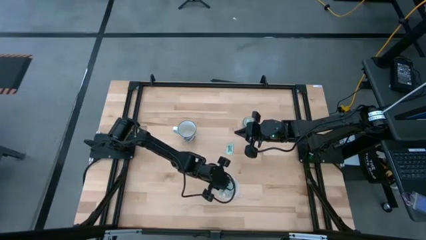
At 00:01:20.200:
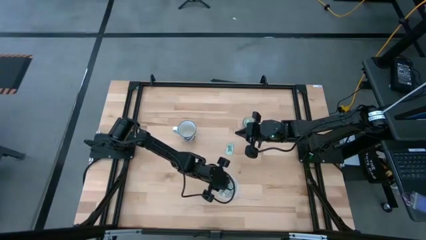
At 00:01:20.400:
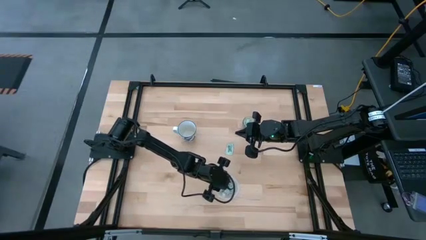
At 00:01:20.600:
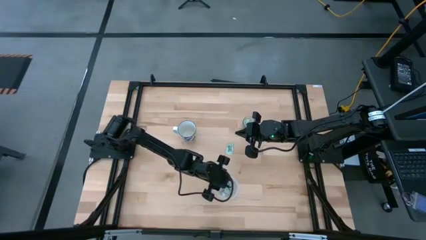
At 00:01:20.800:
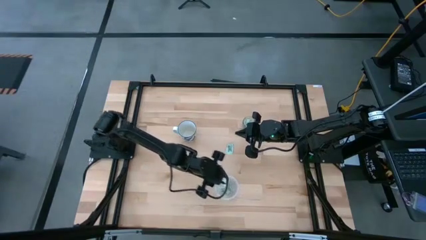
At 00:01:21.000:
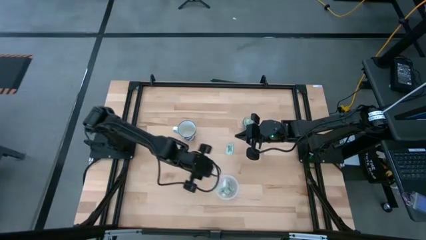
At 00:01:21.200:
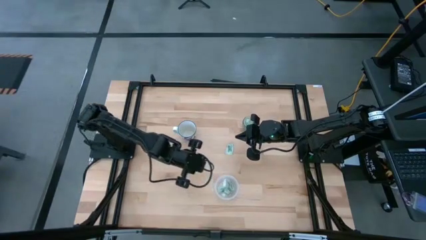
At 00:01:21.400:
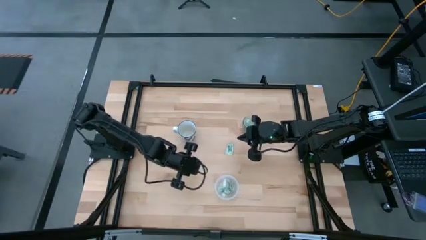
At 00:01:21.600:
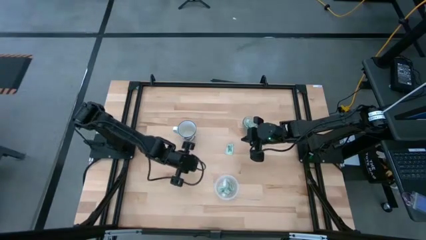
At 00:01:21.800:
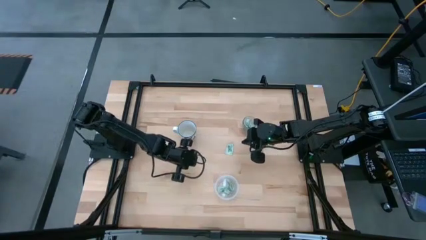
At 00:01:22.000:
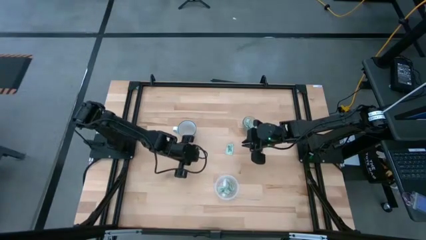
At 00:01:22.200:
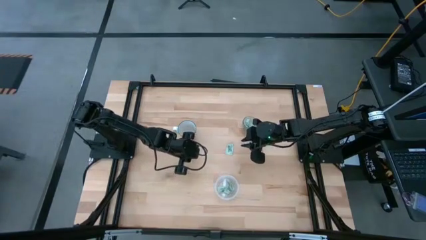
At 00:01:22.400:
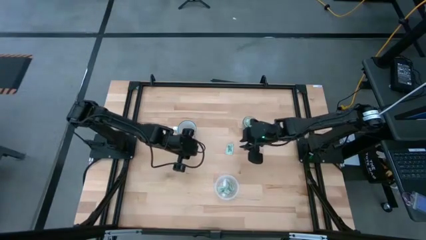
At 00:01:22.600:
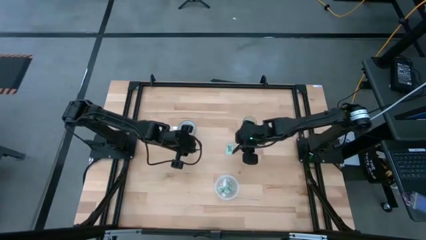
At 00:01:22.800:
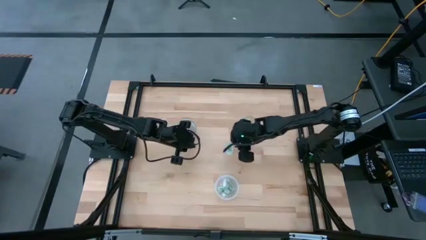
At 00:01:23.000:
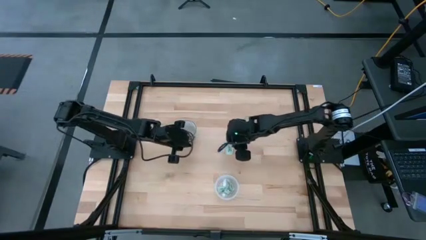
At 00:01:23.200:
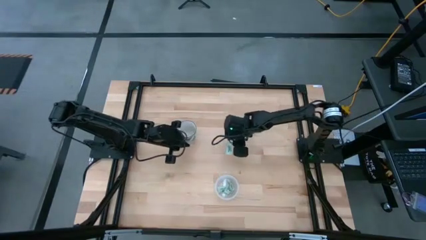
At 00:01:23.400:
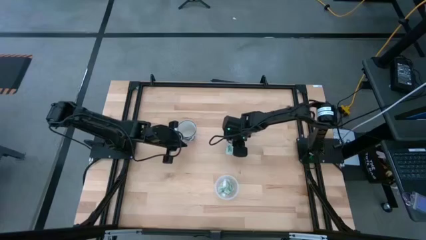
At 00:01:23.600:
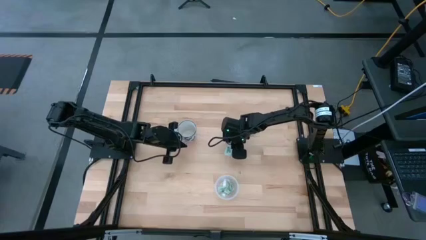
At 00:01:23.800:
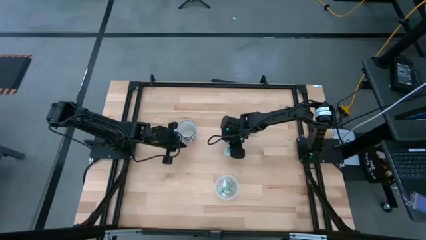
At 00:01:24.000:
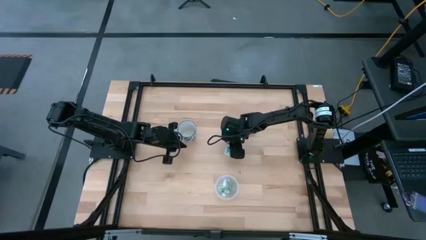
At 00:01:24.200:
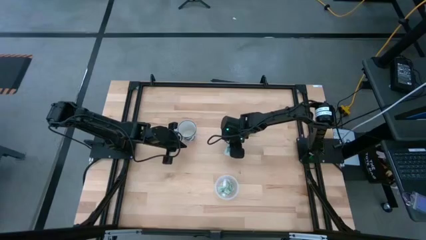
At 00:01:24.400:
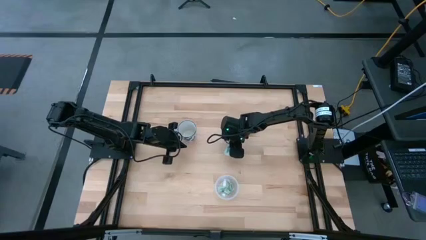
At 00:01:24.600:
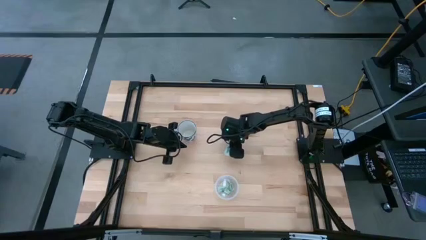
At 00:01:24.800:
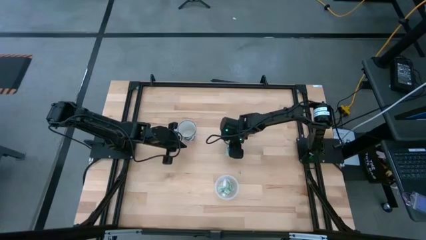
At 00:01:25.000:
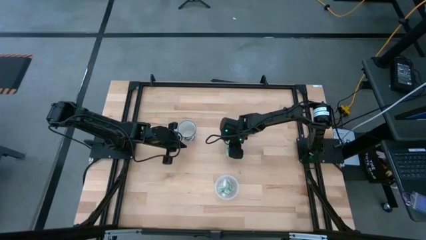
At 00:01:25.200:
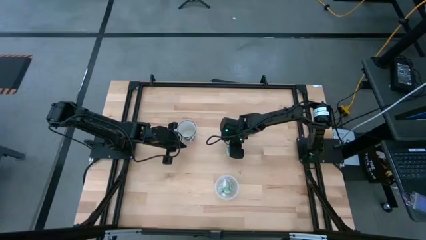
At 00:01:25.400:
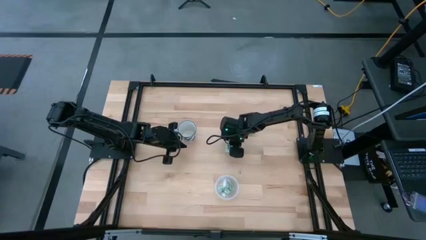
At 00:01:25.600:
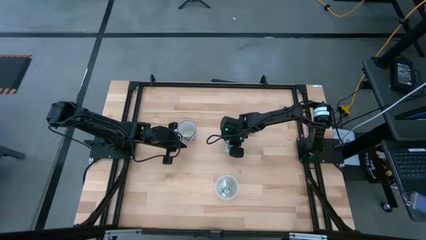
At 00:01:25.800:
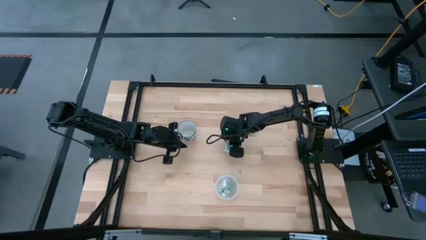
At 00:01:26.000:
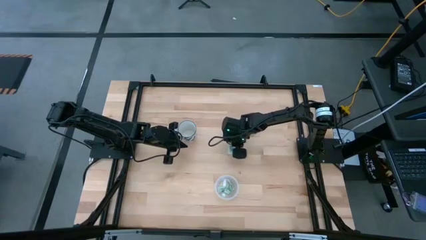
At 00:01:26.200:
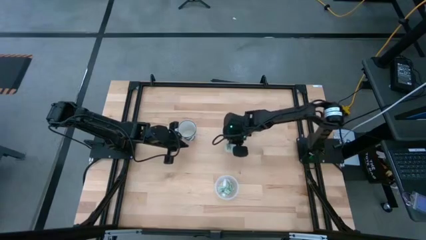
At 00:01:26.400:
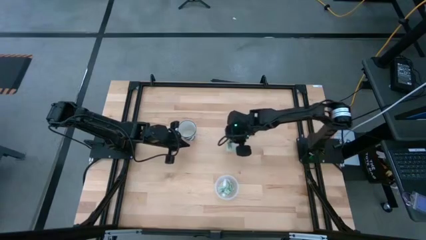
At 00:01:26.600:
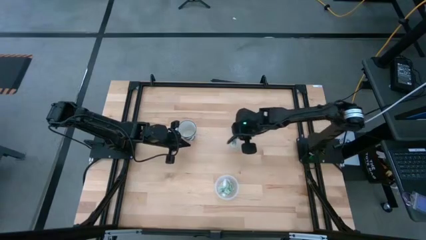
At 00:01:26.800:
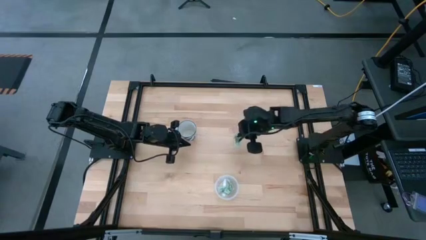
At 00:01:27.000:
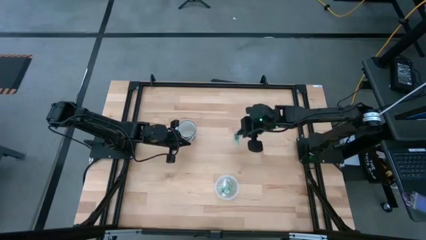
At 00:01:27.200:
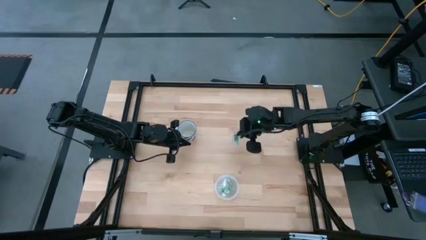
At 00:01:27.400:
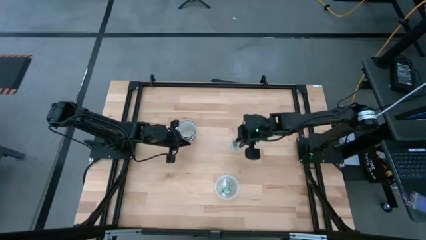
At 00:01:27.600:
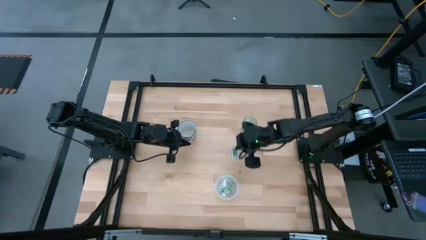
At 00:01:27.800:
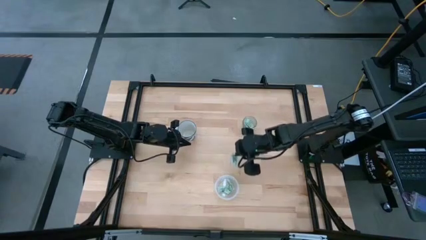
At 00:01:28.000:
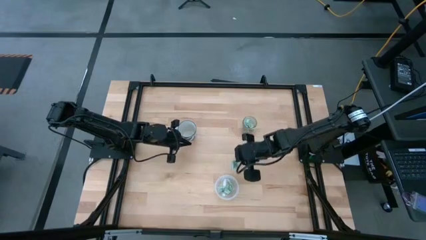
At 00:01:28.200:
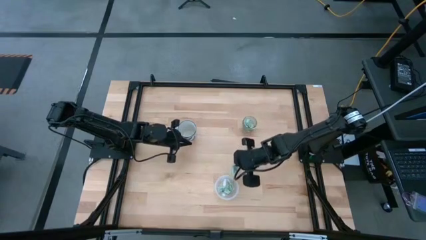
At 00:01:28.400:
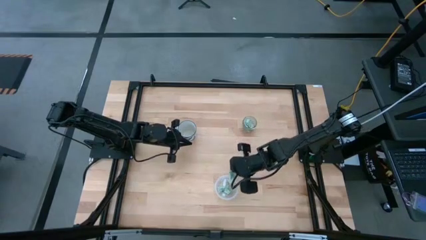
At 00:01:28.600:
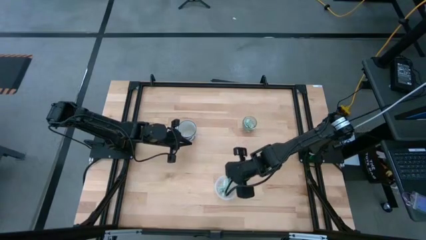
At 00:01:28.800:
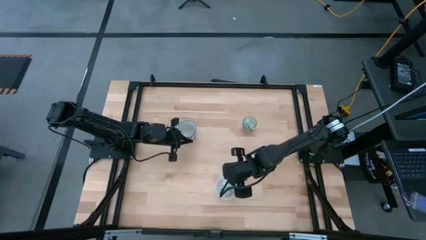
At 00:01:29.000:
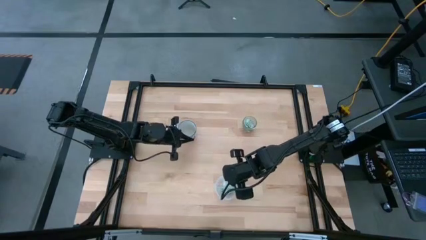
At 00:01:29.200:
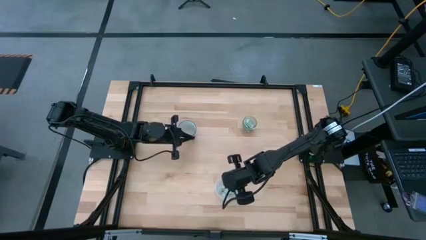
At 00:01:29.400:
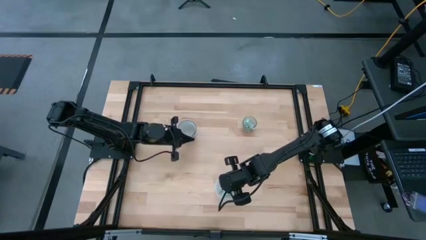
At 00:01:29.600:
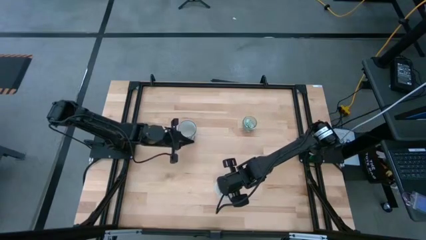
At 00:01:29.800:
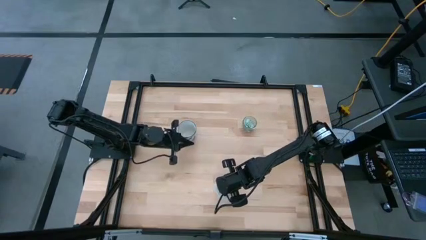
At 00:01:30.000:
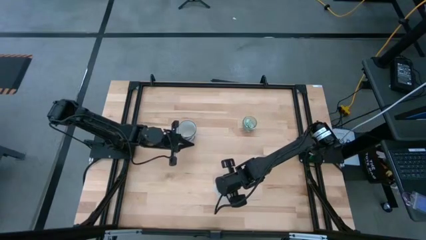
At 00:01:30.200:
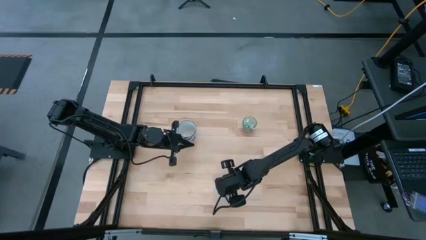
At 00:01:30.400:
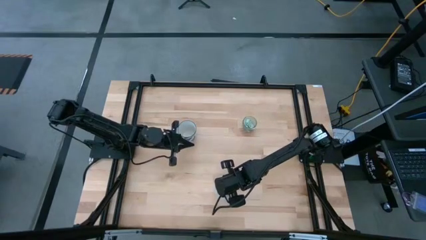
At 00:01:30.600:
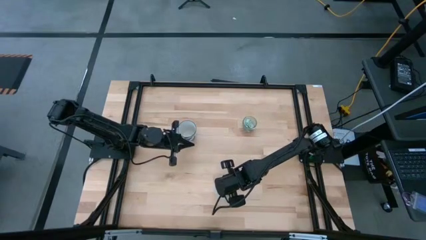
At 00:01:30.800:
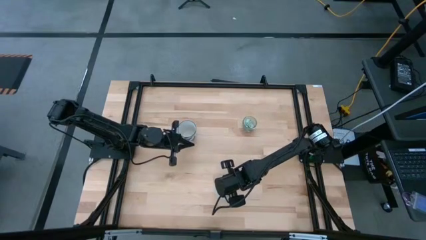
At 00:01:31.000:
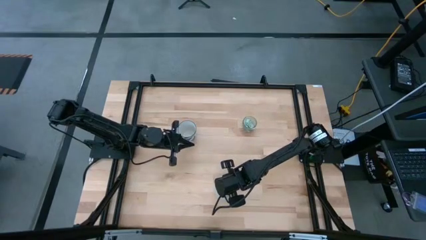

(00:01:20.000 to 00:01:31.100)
Task: Pick and place Stevia / Truvia into bins
Put the white stevia packet into the transparent container
